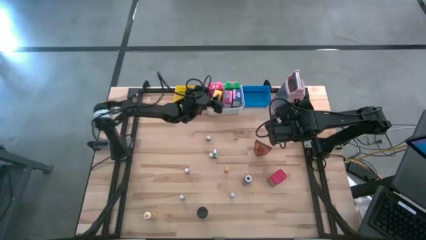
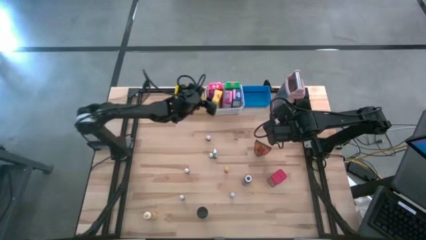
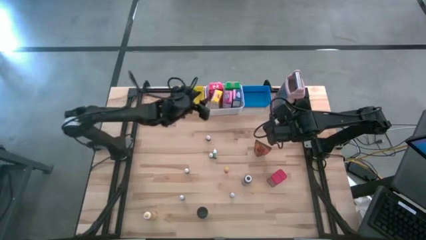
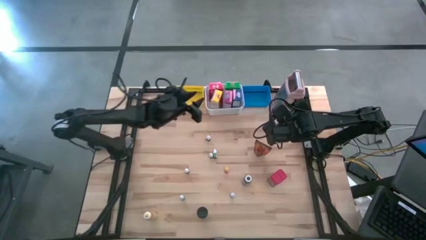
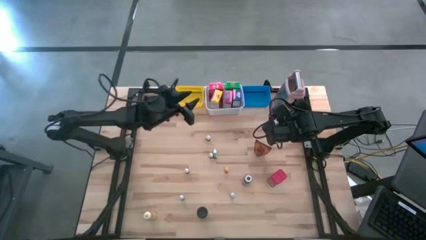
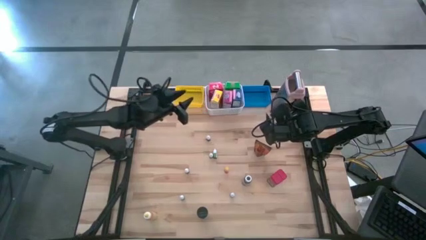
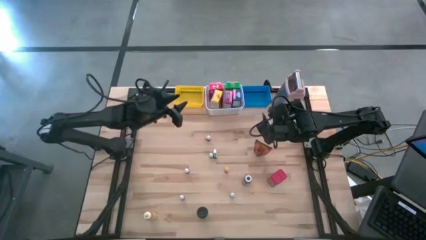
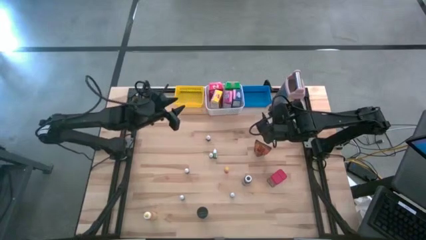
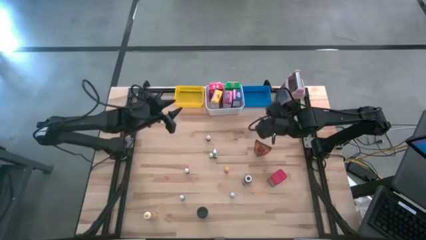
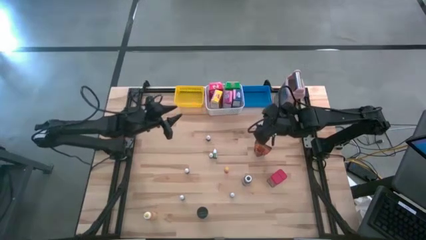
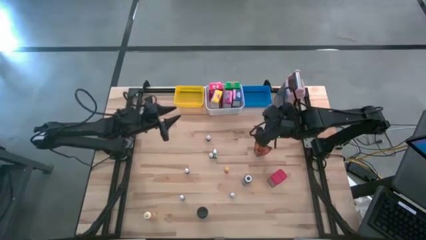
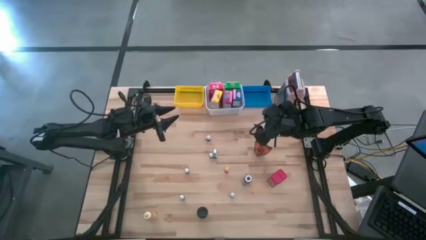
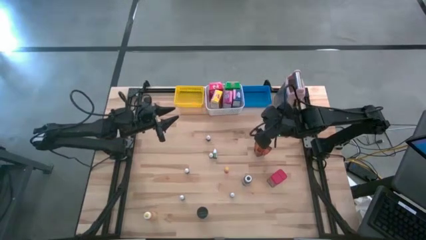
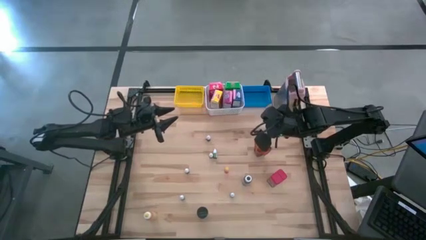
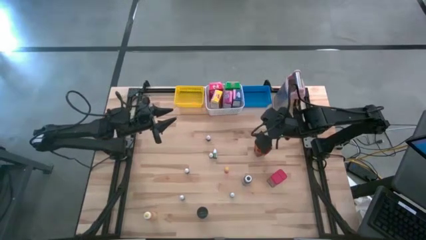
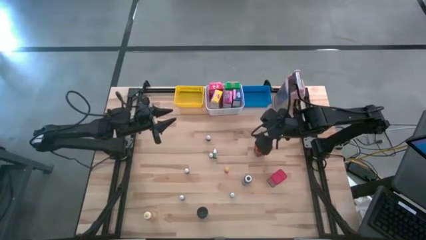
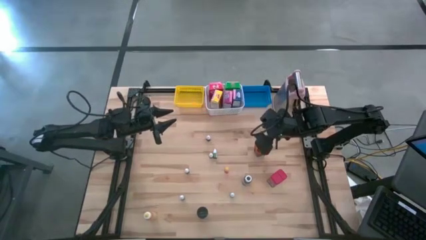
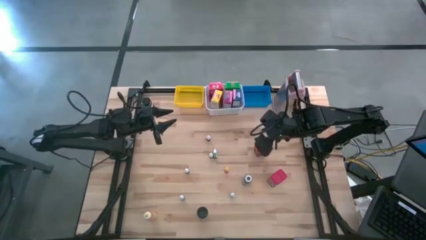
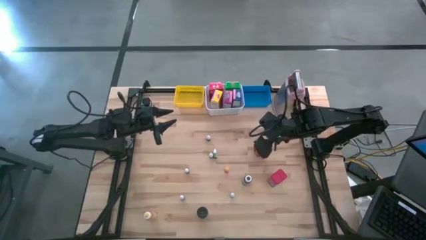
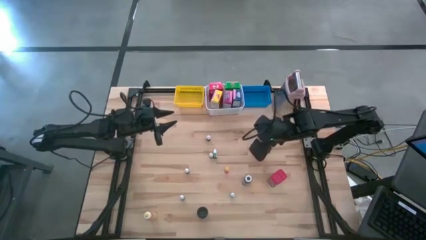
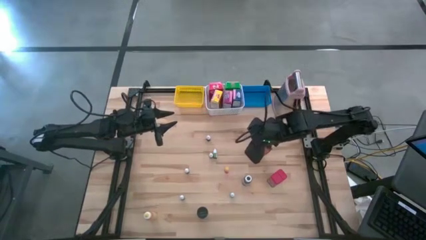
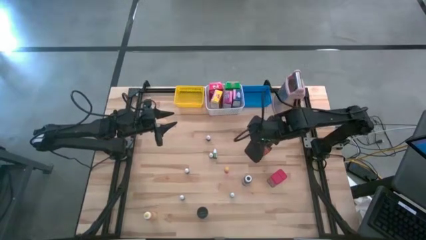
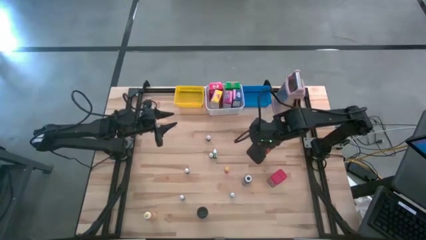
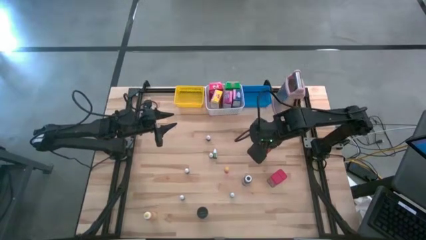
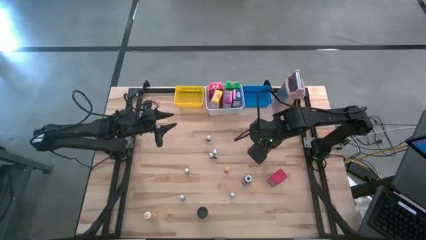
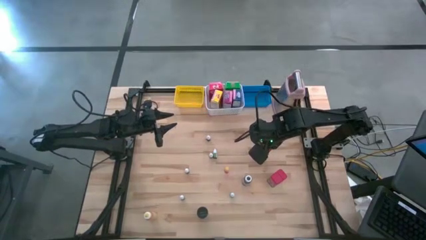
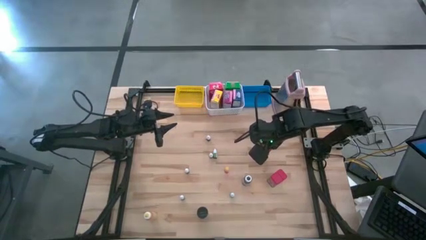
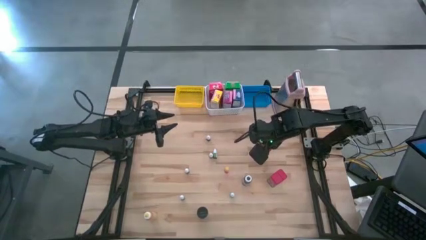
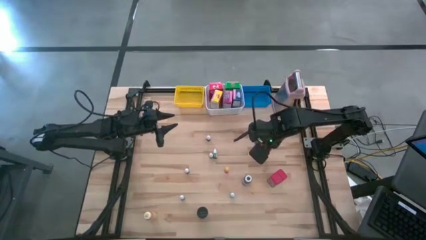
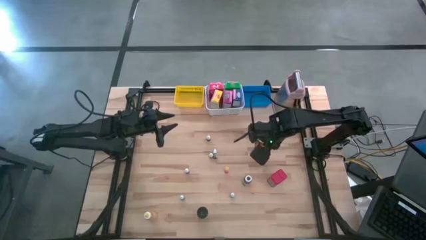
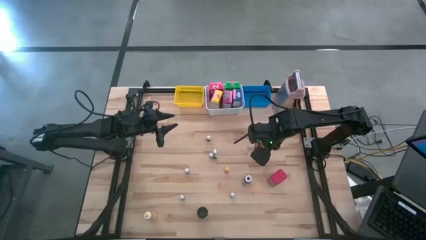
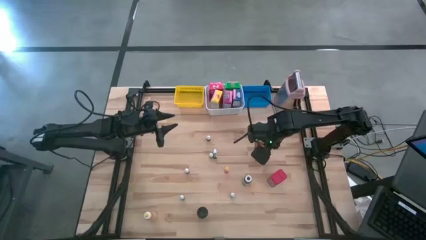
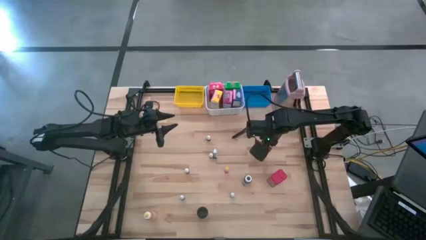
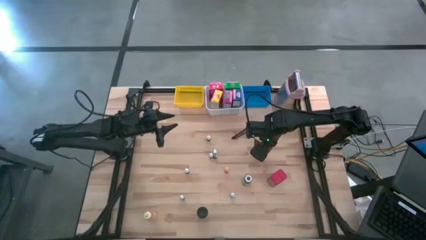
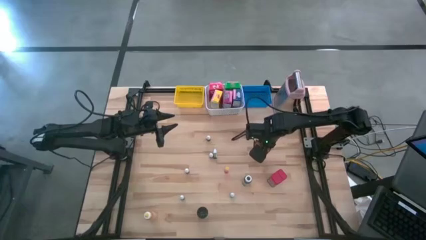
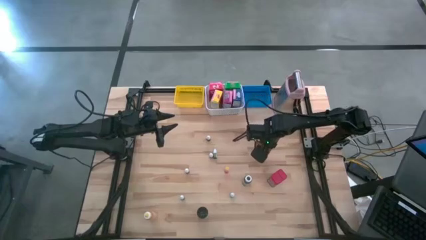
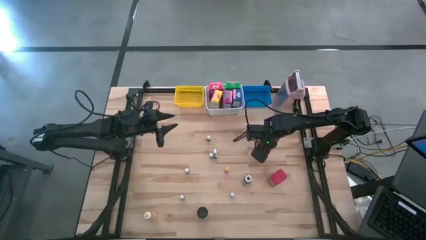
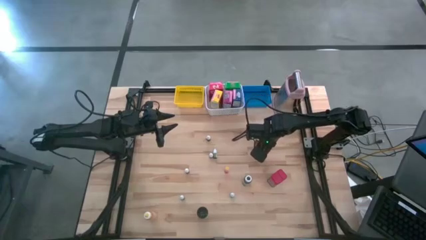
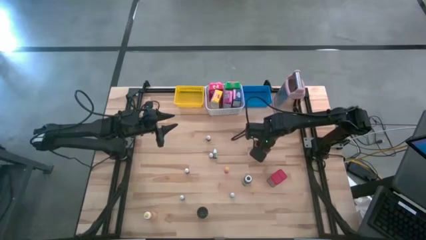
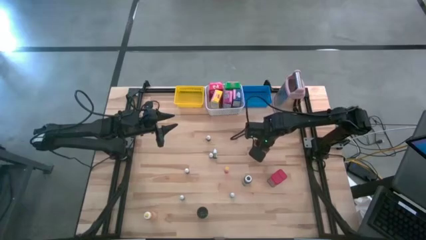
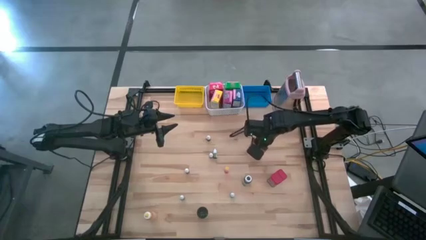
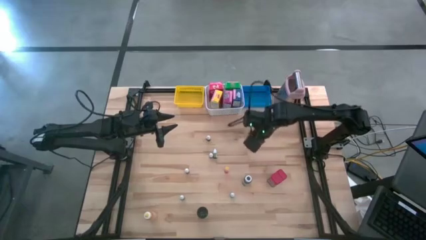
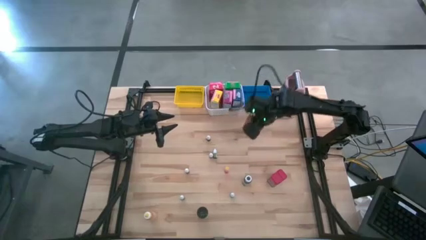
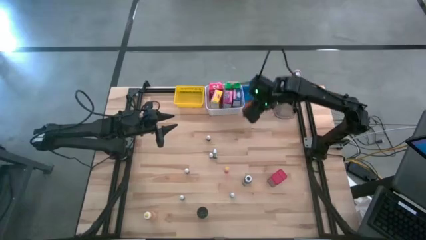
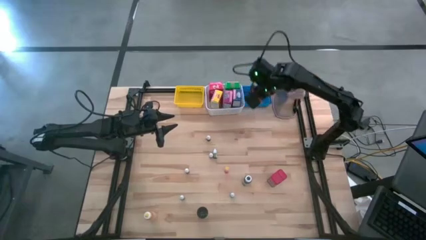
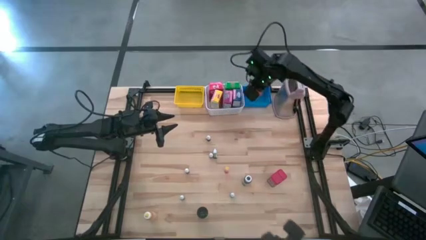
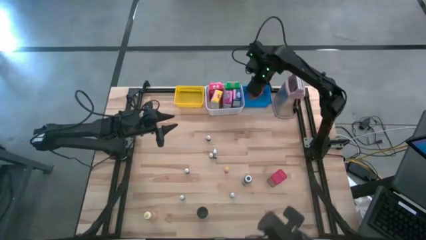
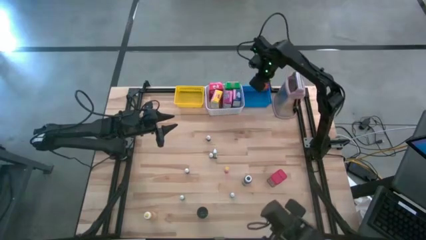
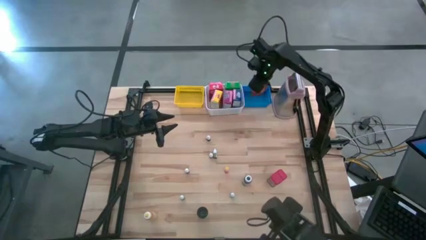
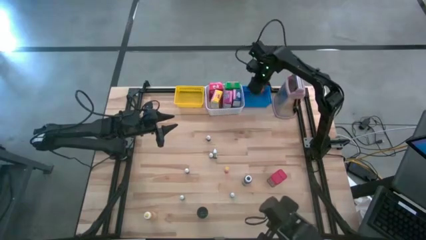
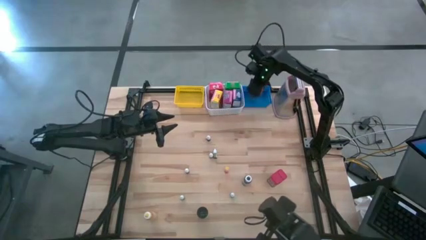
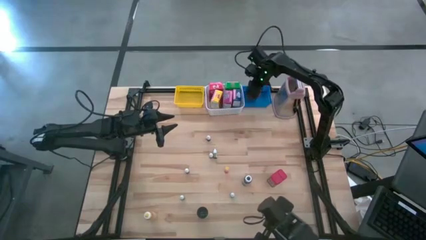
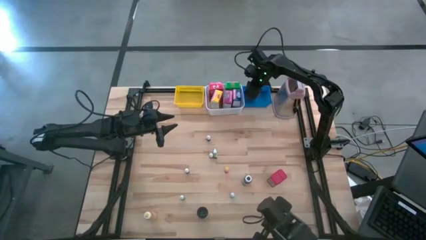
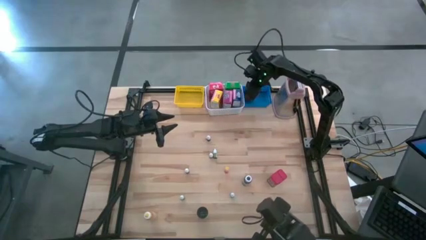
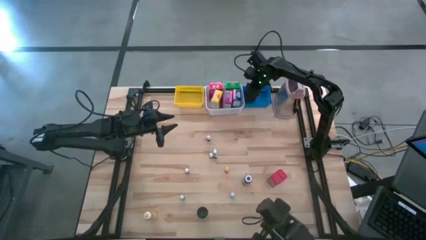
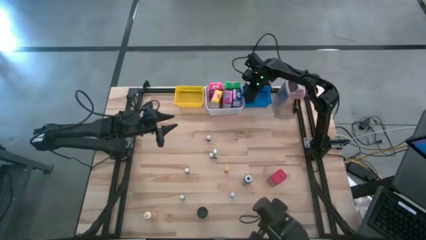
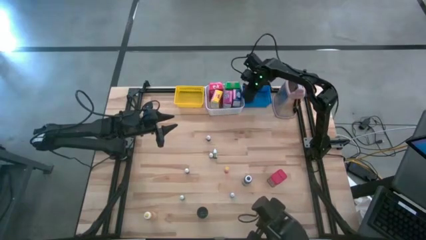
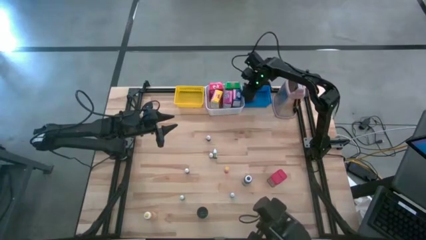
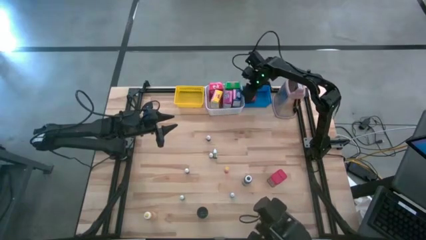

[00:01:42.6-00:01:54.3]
Task: Pick & Place Kitchen Items
Put the orange seasoning pack into the blue basket

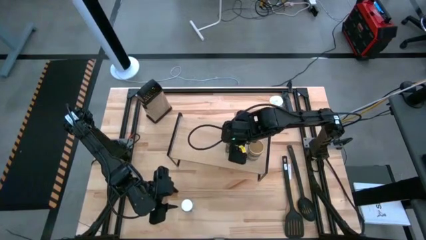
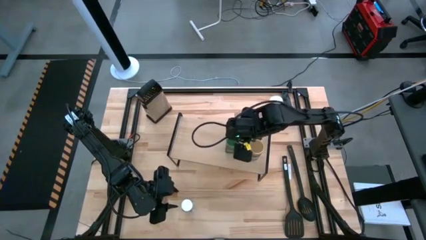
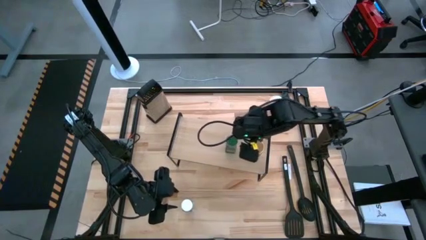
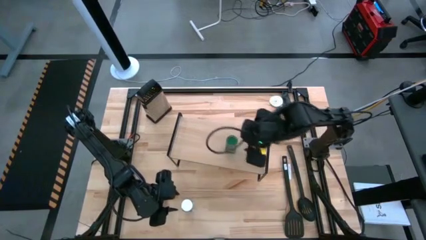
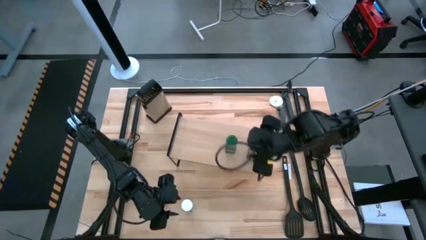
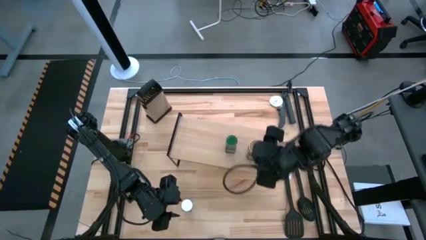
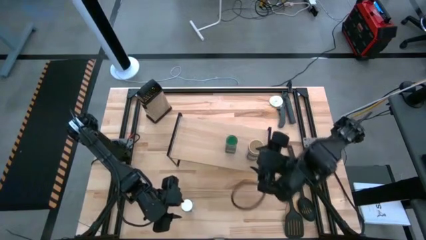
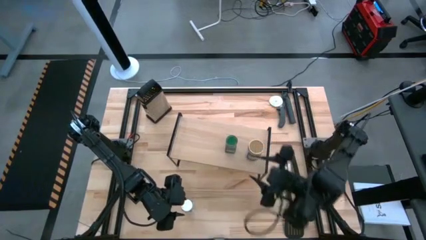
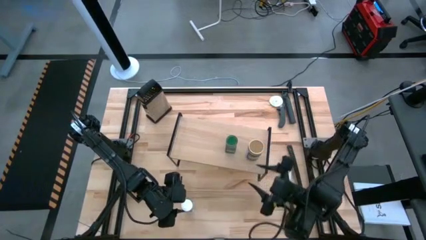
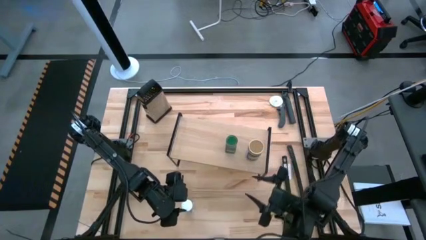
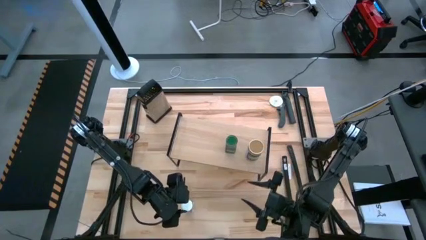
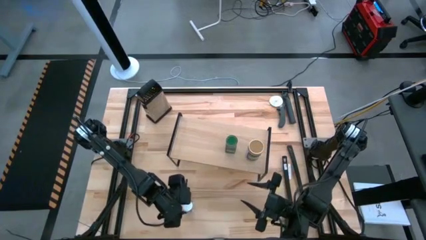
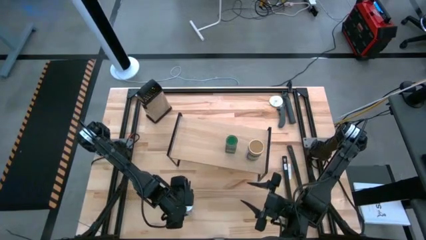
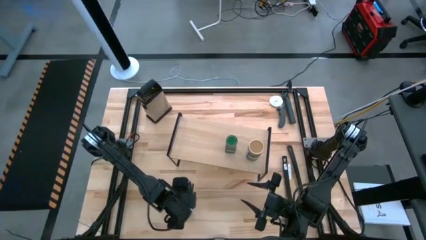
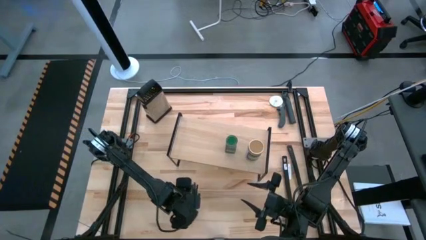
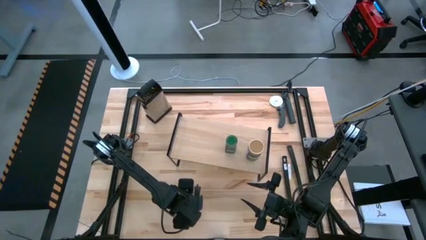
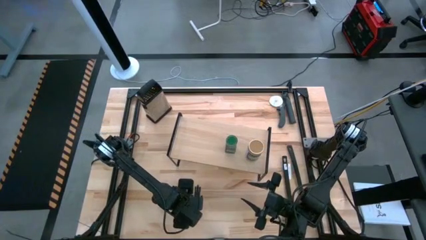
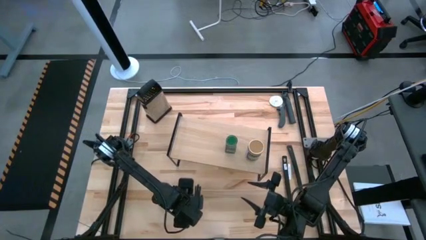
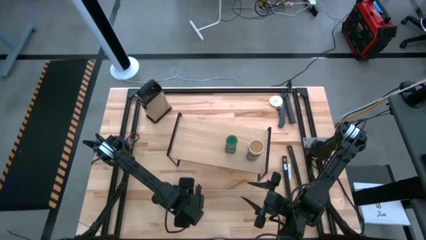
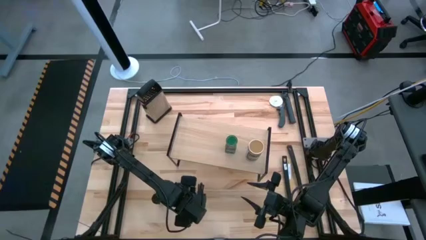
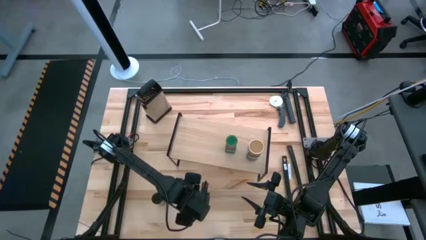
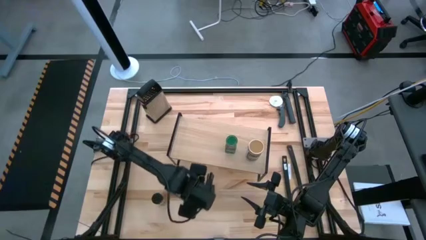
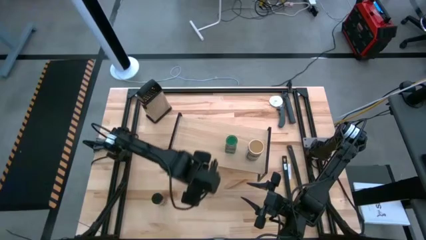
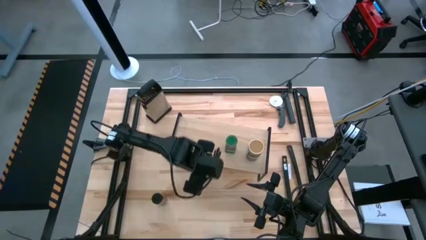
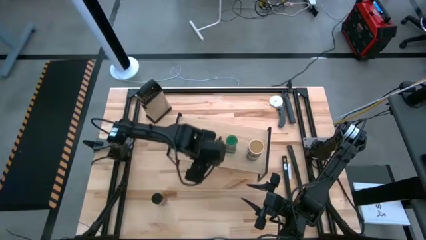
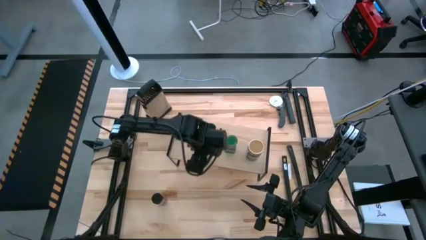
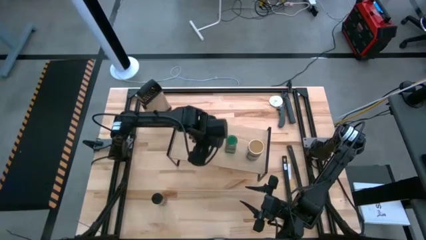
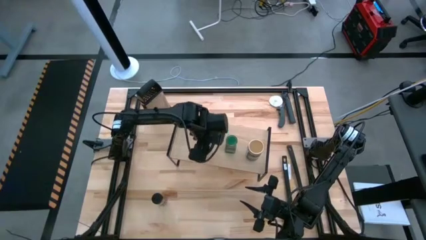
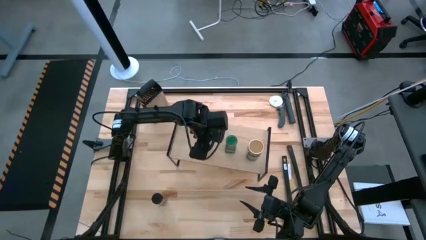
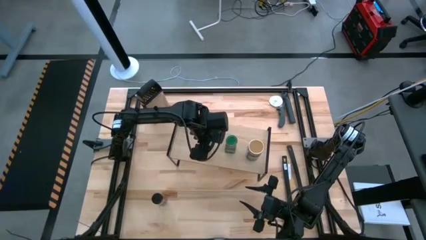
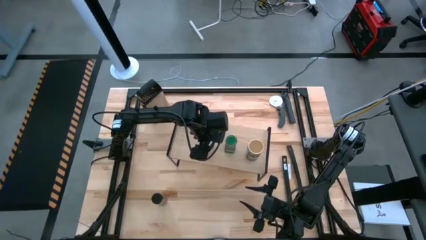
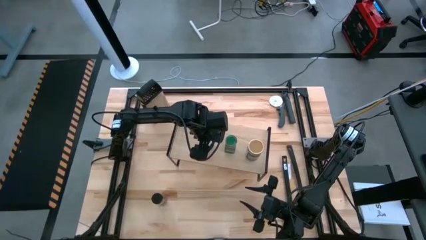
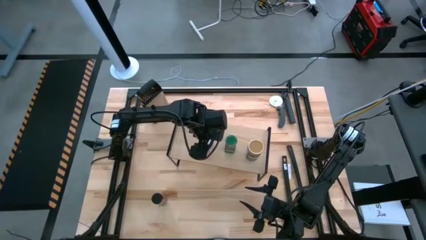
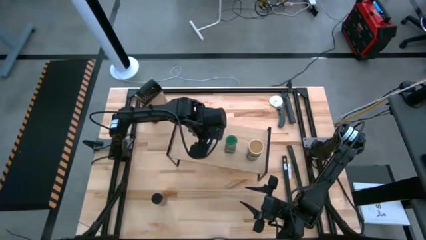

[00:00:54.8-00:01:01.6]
Task: Shelf spices
Put the white seasoning bottle on the shelf
